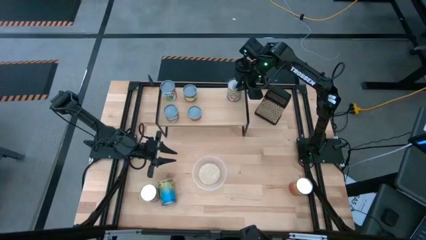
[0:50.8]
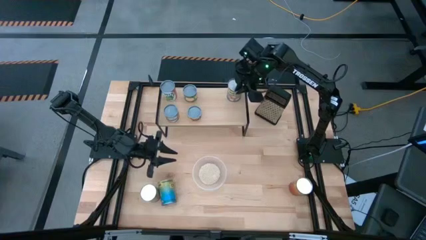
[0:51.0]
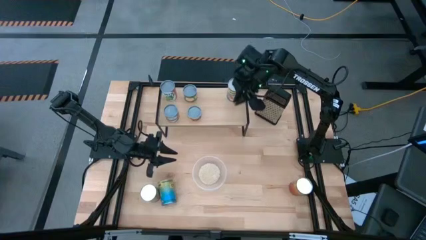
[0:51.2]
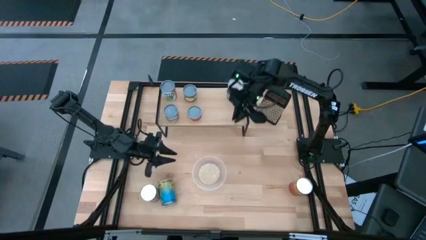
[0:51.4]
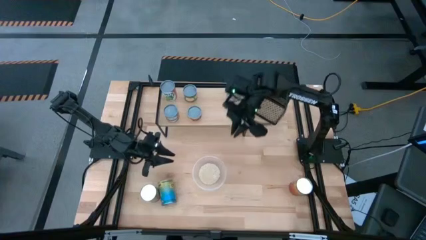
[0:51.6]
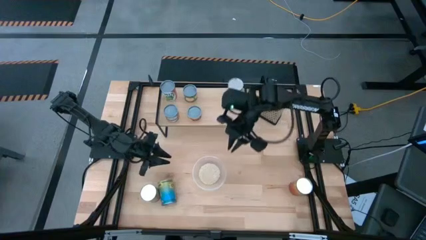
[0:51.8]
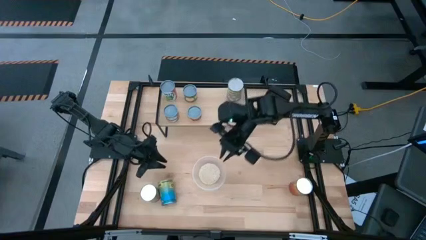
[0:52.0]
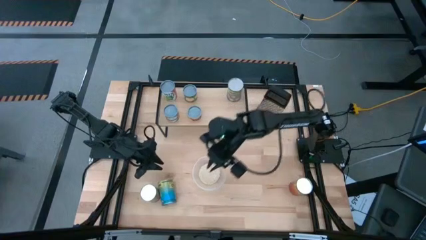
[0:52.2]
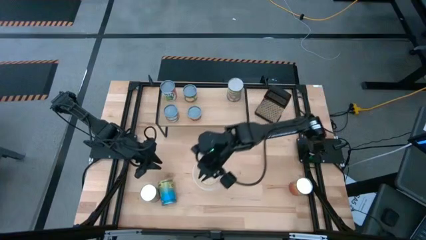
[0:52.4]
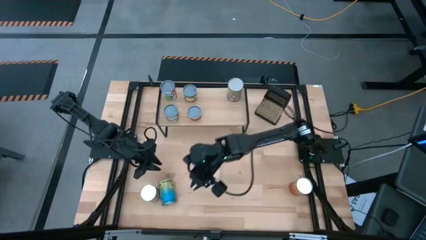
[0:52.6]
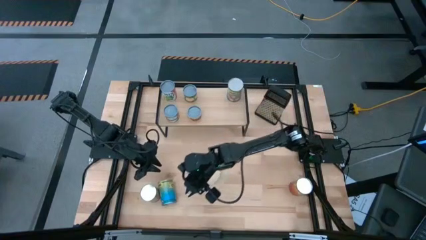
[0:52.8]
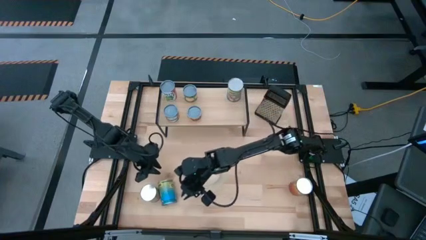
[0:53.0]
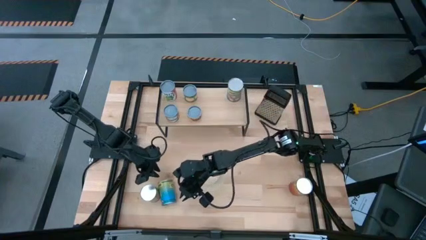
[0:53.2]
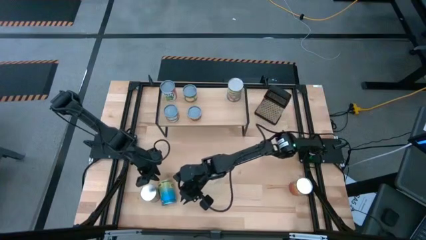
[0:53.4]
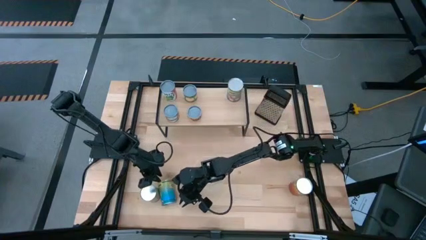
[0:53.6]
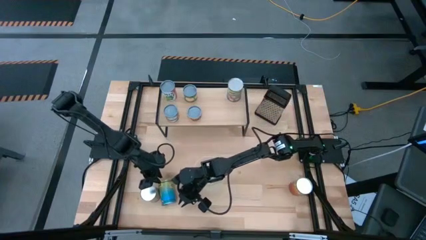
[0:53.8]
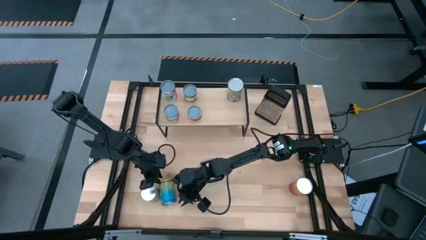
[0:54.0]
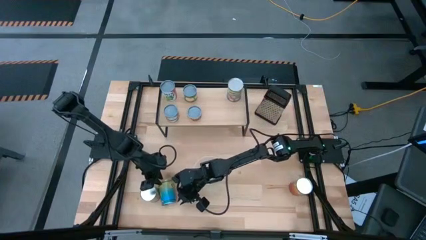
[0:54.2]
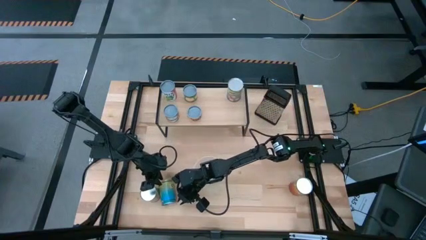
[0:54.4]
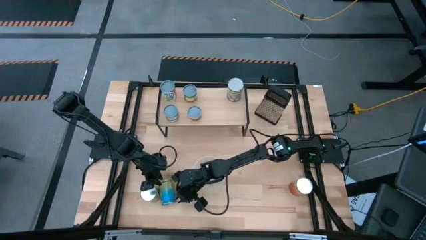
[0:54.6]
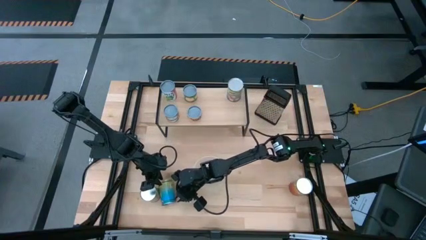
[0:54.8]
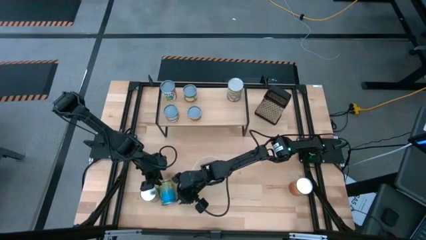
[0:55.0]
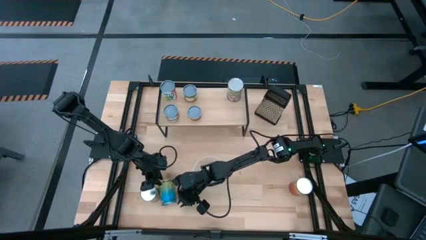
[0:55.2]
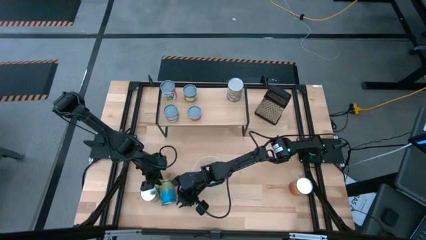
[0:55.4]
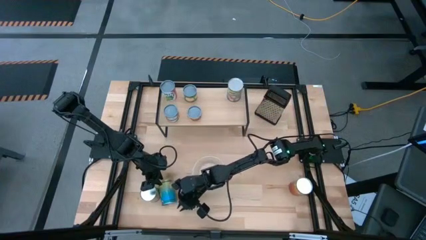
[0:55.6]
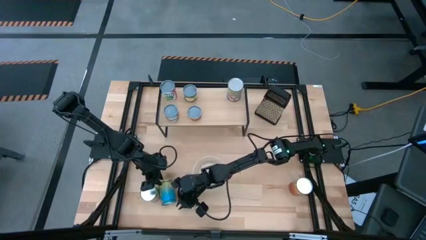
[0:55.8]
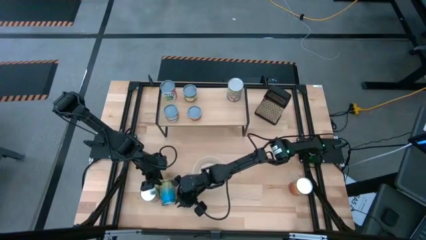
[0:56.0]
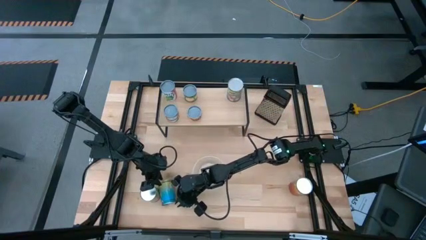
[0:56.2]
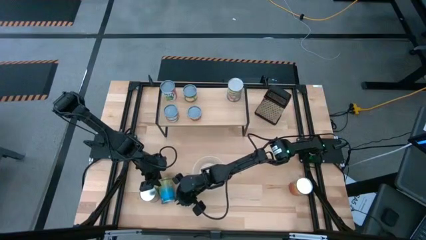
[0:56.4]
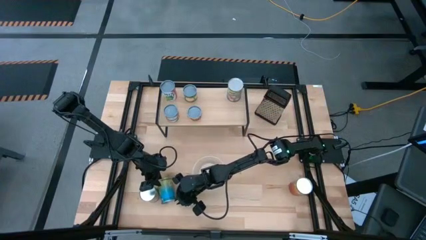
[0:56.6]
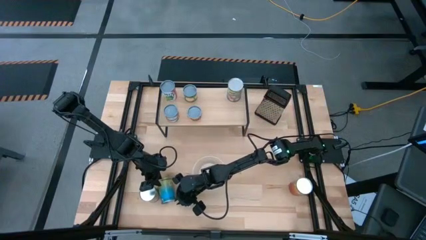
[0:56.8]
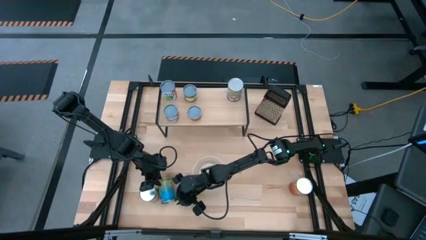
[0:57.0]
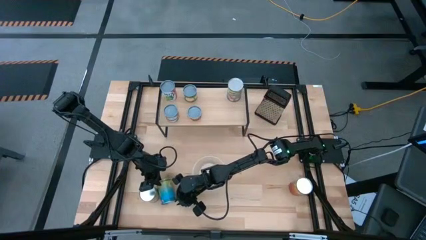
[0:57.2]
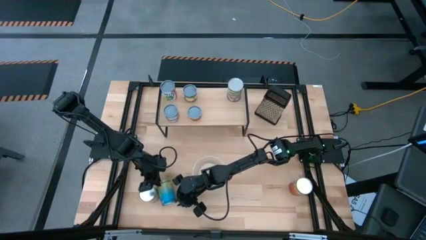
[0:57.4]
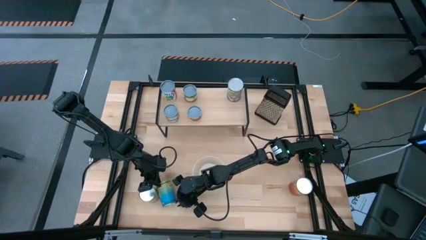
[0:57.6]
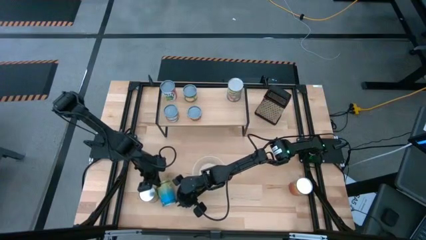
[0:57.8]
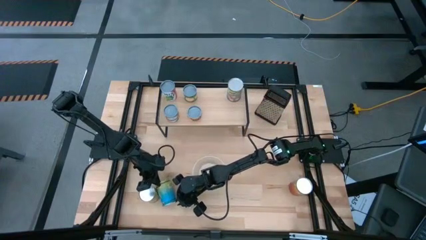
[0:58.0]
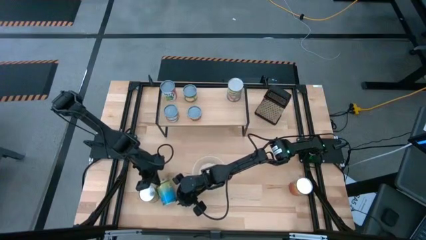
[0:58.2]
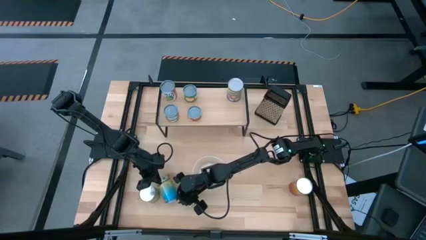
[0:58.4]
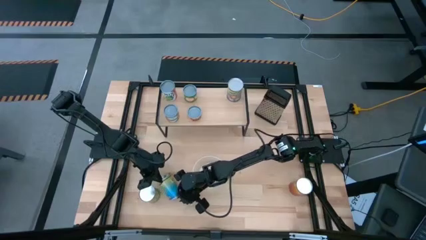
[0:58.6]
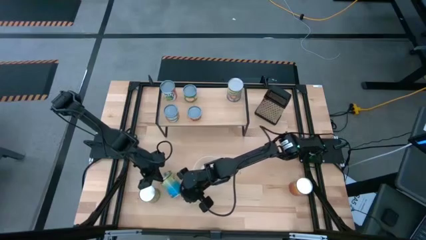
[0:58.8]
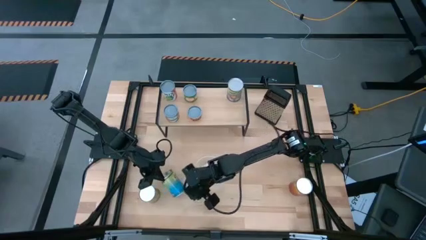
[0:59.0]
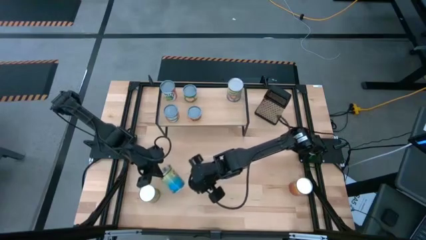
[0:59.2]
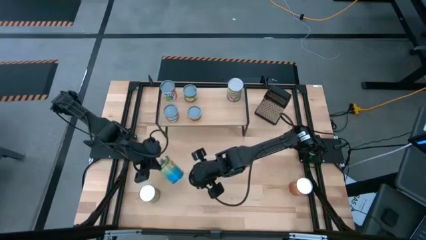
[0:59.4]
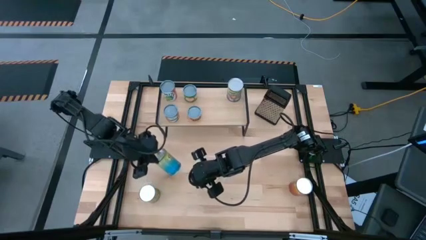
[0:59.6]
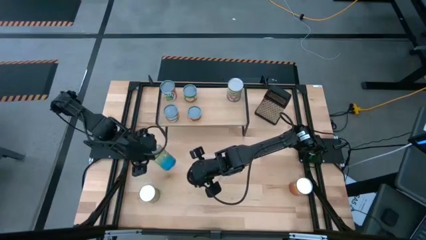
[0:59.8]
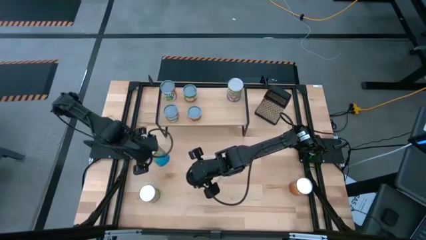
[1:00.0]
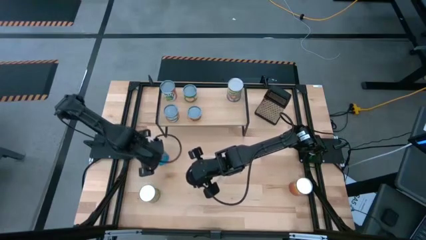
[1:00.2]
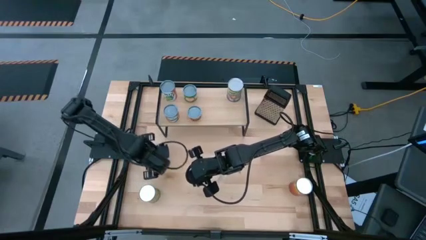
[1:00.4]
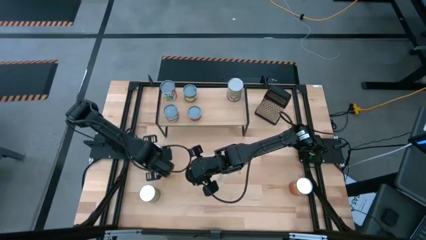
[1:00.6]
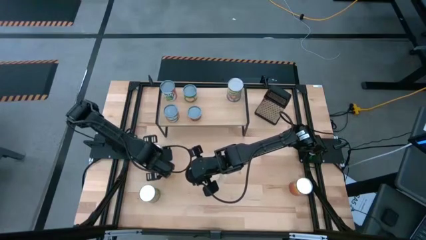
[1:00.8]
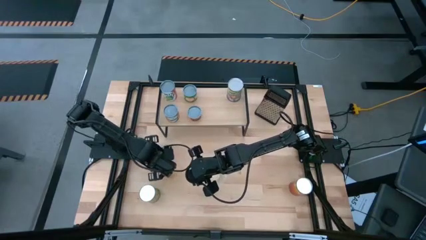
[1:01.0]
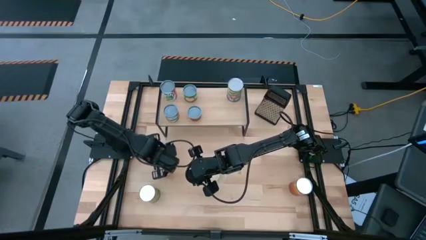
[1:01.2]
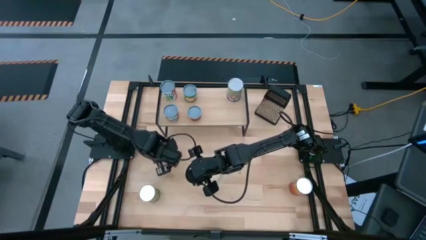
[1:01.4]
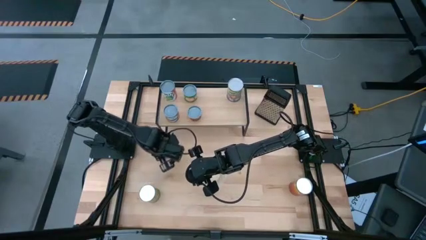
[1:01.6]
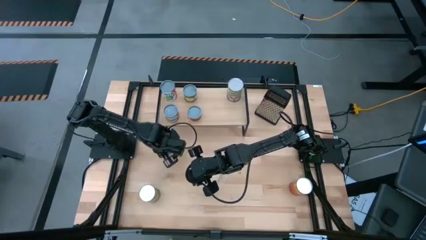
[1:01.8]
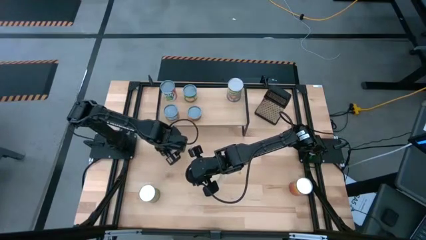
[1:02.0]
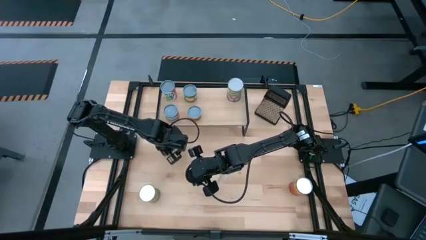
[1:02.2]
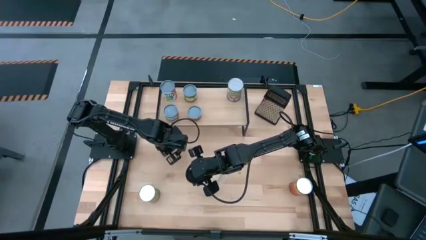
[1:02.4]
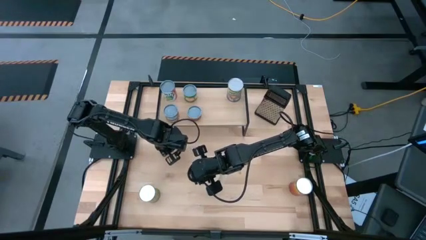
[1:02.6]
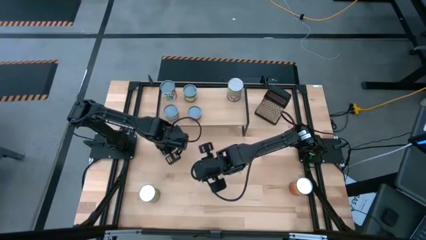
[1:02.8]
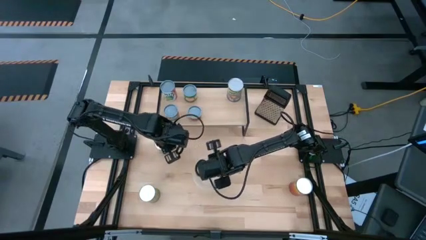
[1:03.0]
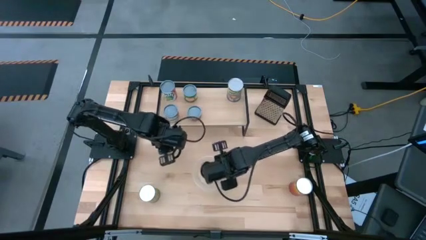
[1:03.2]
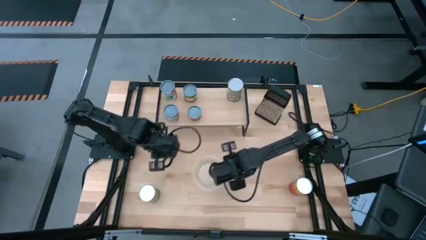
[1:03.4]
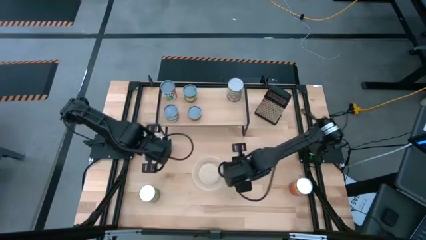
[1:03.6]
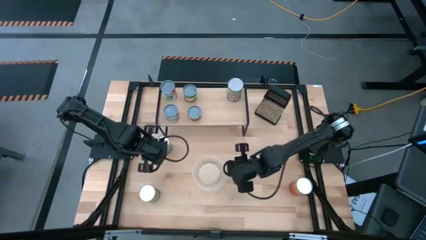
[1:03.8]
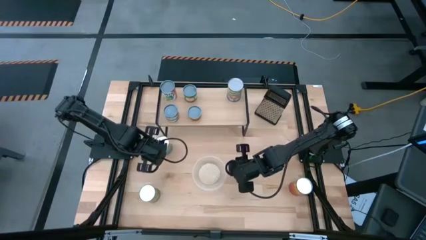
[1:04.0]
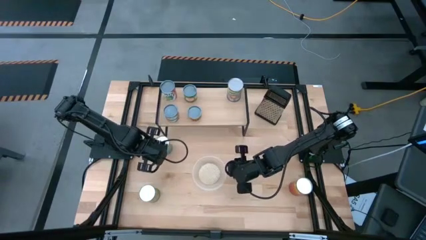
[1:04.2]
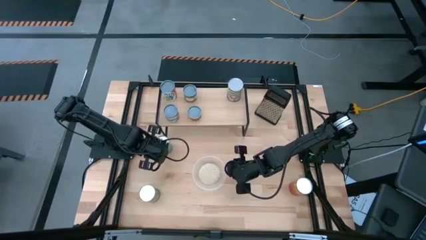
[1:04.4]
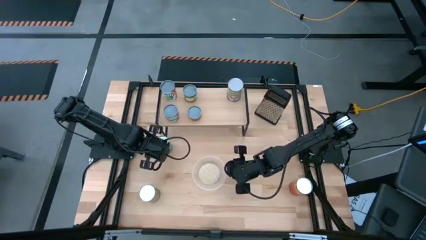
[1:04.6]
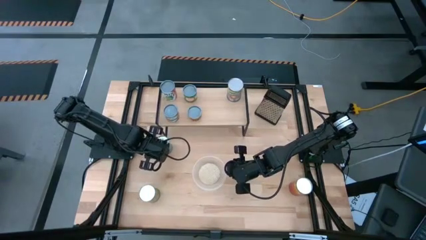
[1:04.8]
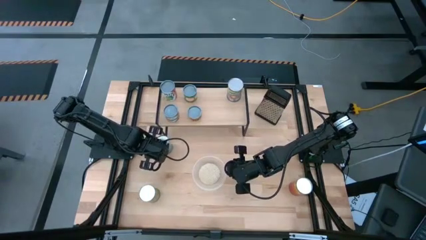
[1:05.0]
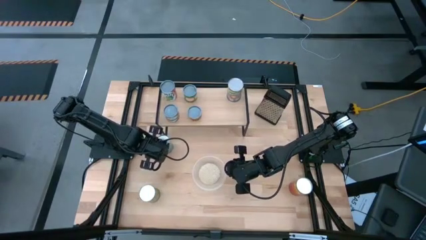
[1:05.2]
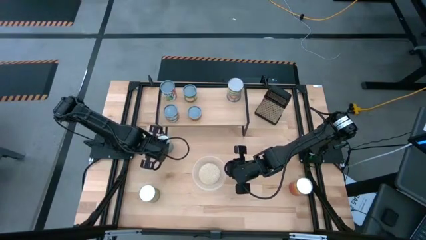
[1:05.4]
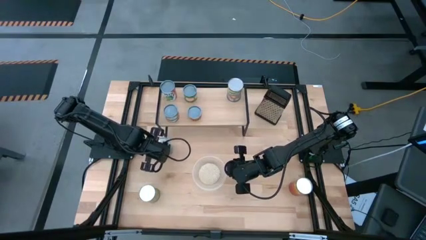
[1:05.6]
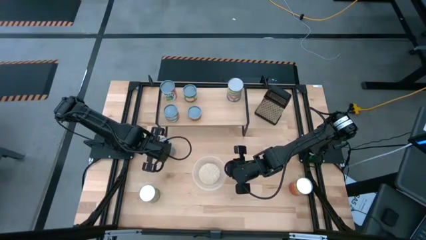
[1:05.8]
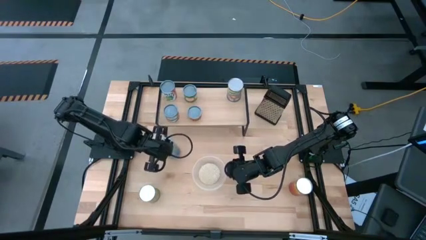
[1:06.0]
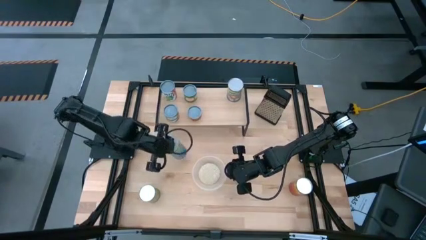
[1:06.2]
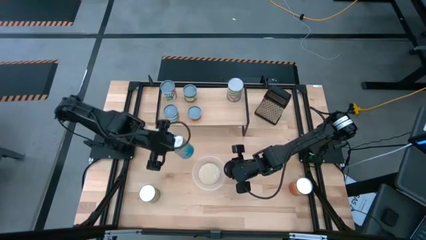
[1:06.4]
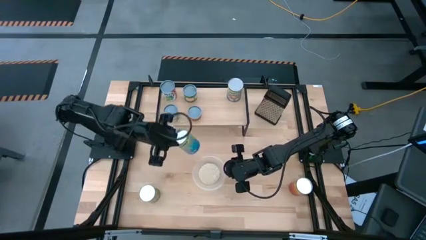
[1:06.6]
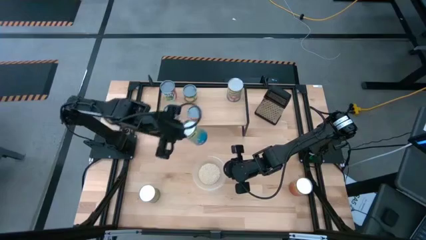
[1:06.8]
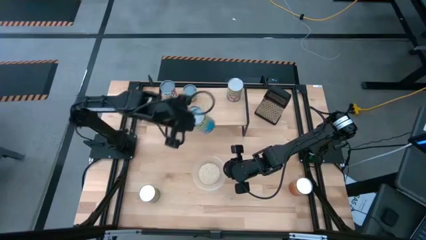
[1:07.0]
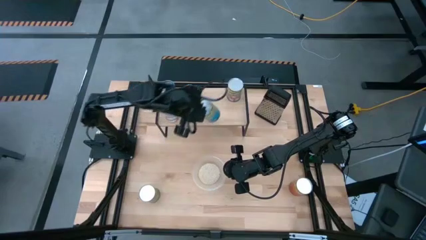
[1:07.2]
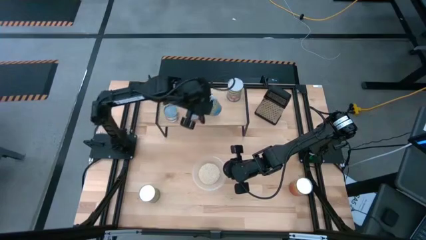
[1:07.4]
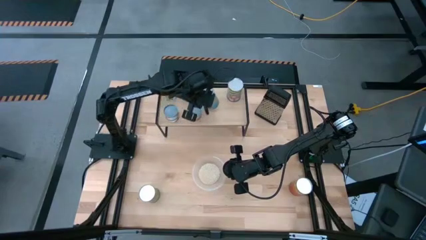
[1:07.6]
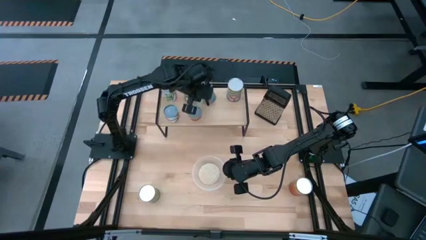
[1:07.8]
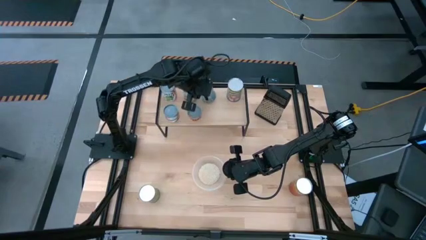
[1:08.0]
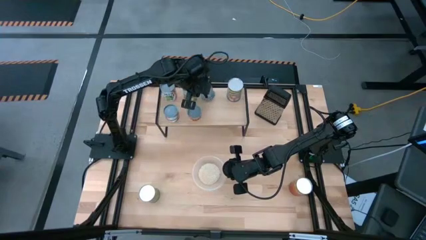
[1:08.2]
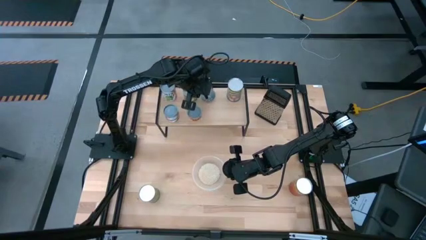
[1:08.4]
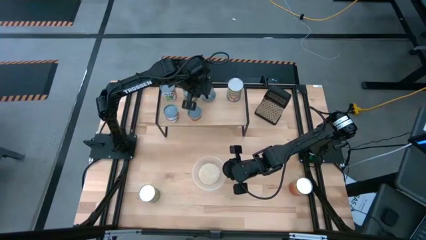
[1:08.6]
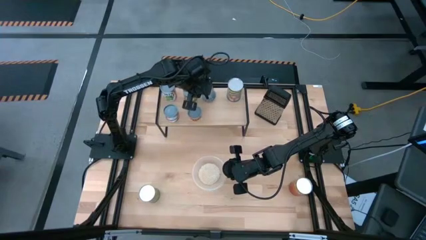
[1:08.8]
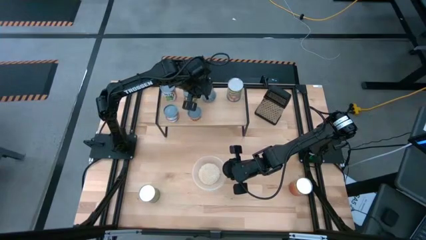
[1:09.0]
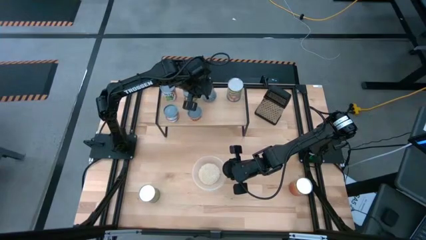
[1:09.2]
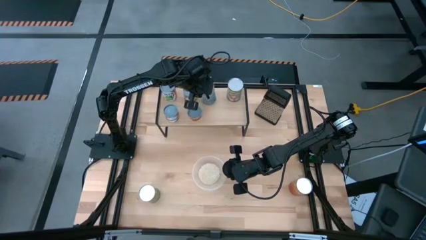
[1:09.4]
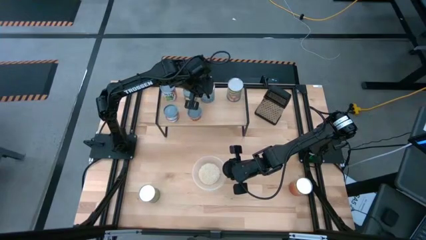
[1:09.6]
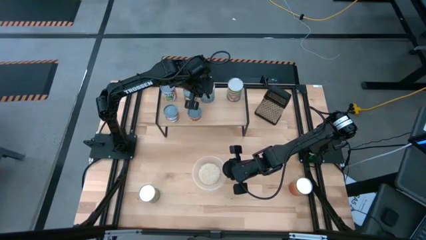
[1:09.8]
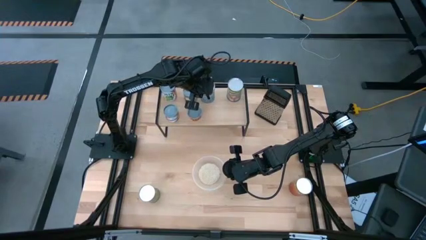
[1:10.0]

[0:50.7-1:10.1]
Task: Pick and place cans onto a shelf
Put the canned cherries on the shelf
